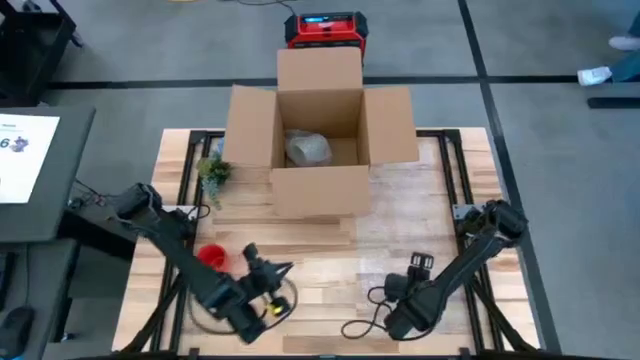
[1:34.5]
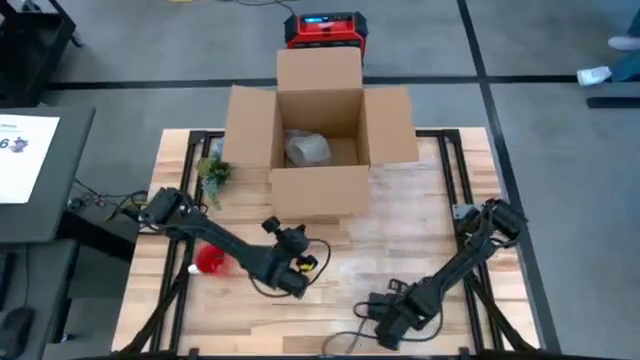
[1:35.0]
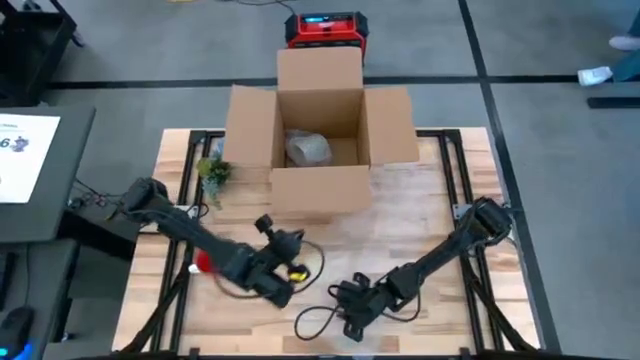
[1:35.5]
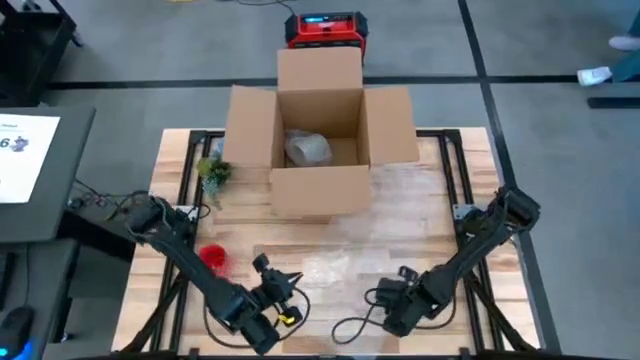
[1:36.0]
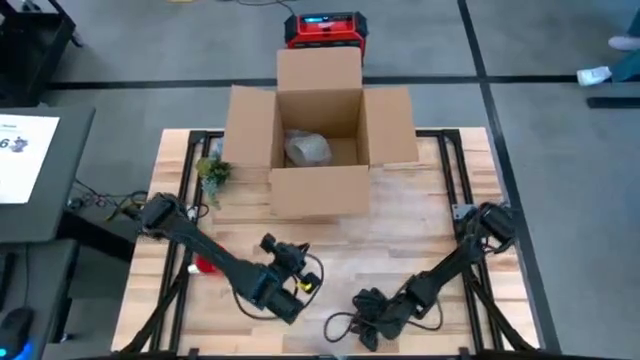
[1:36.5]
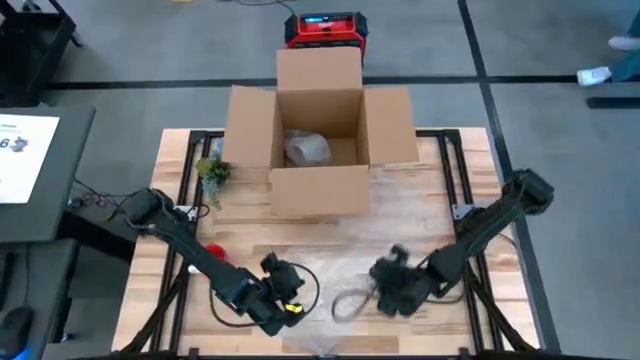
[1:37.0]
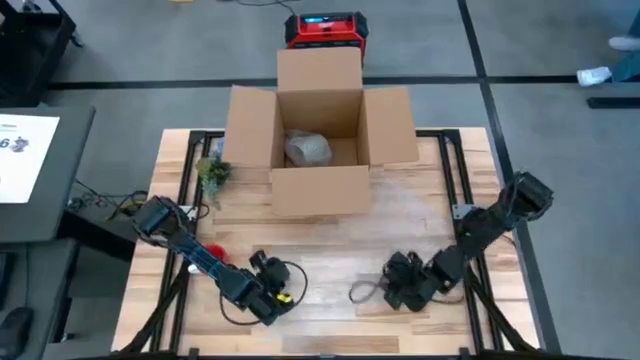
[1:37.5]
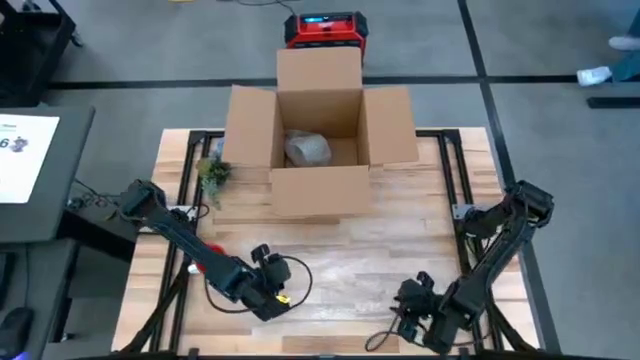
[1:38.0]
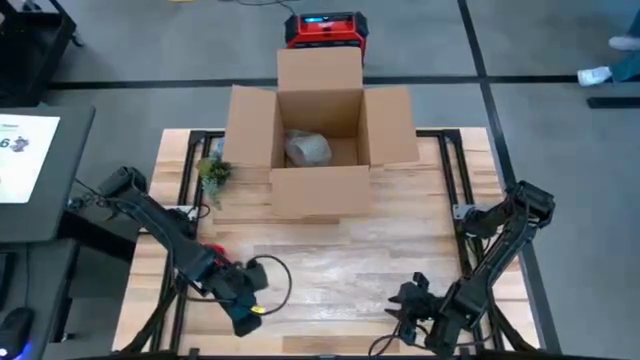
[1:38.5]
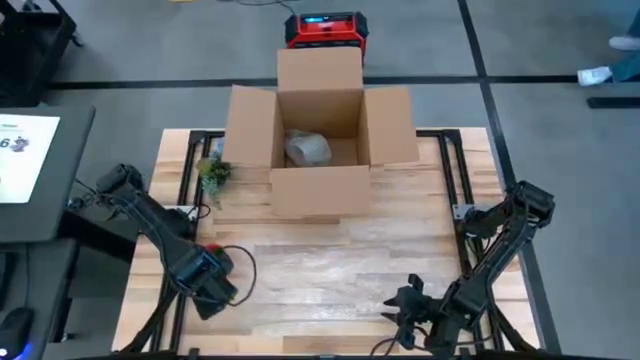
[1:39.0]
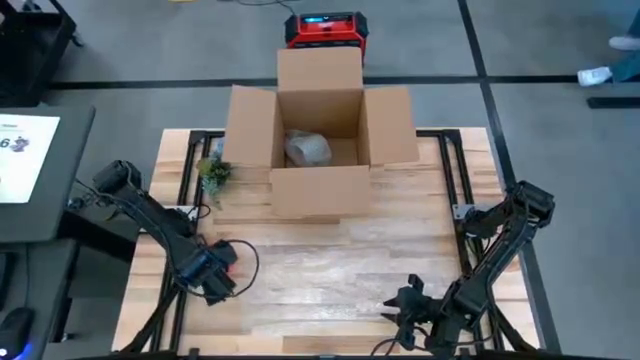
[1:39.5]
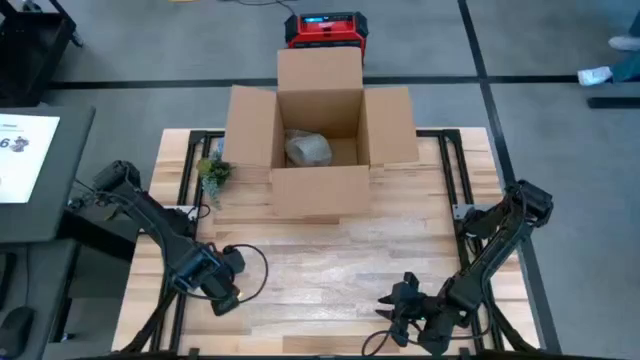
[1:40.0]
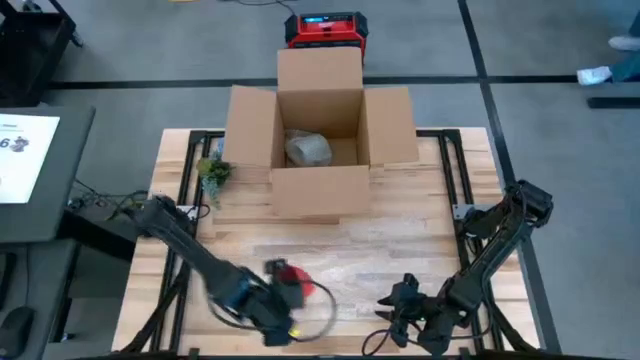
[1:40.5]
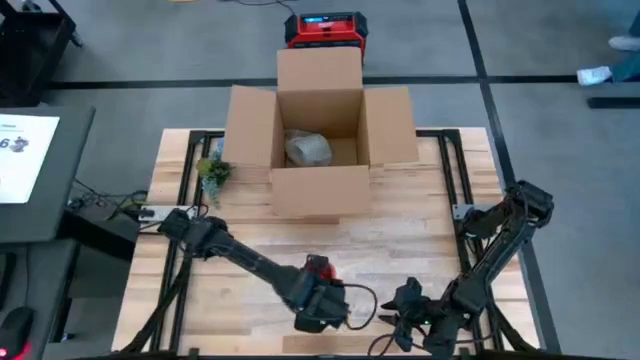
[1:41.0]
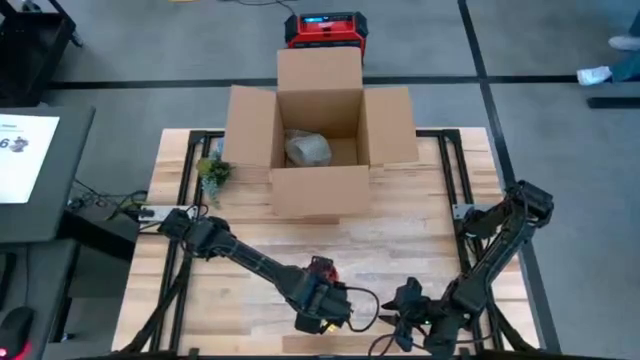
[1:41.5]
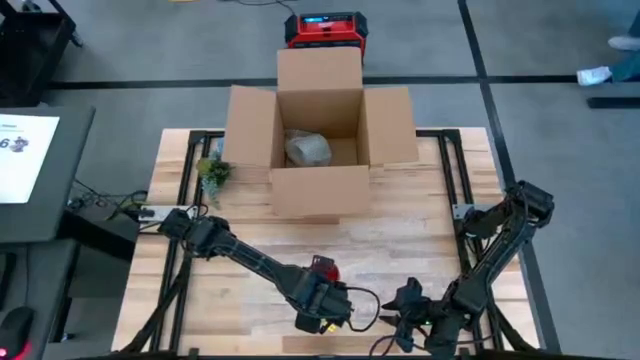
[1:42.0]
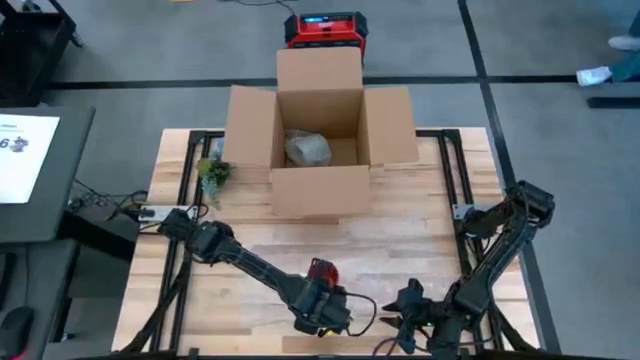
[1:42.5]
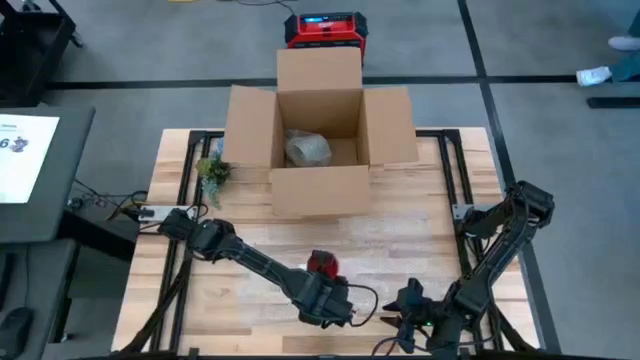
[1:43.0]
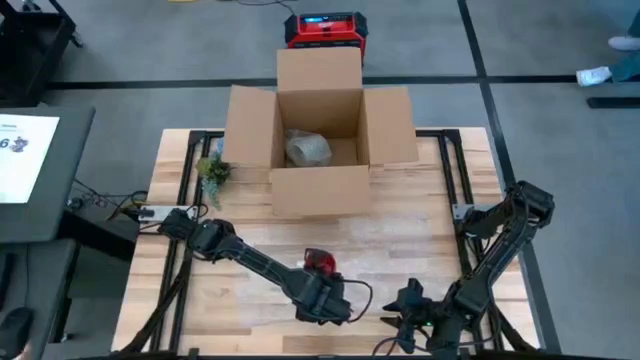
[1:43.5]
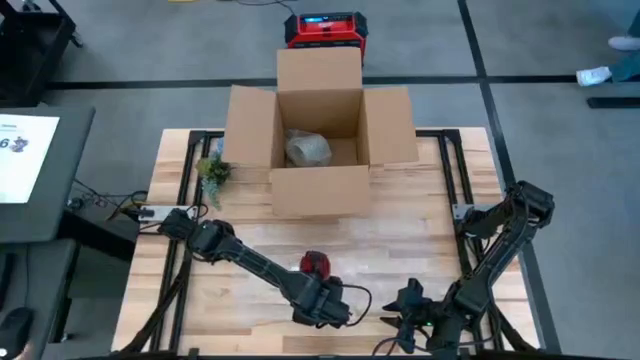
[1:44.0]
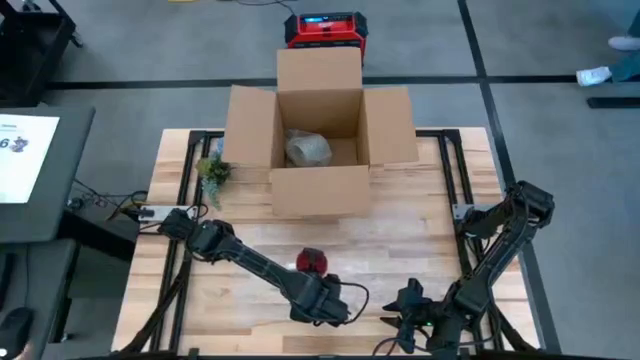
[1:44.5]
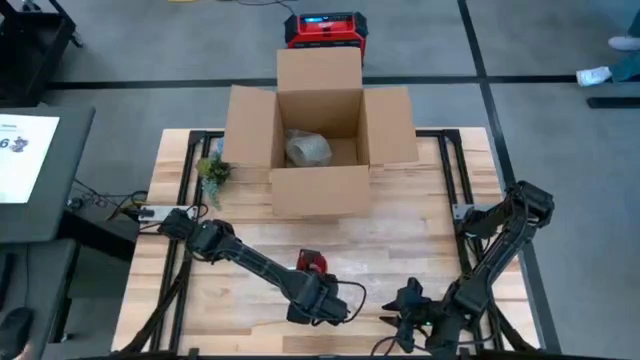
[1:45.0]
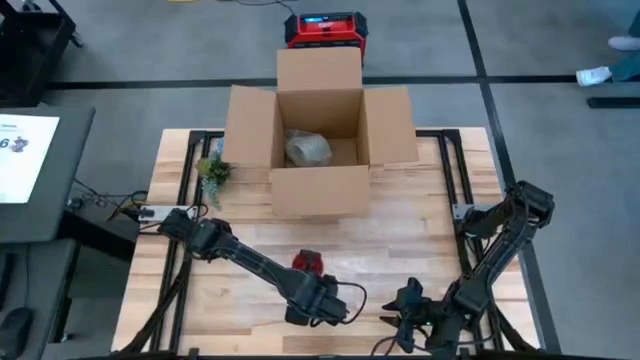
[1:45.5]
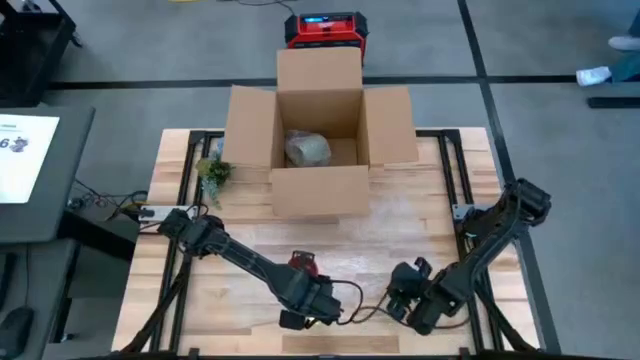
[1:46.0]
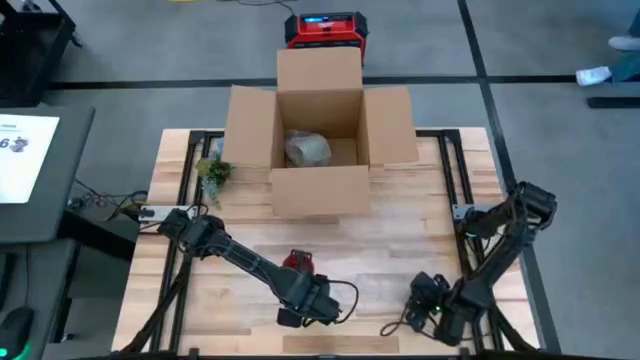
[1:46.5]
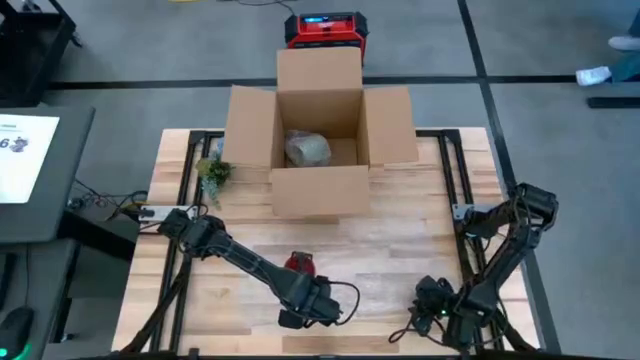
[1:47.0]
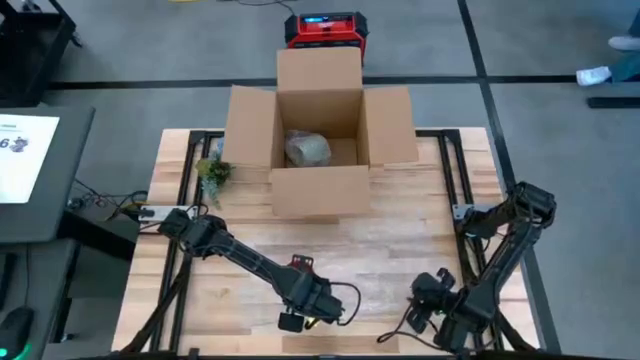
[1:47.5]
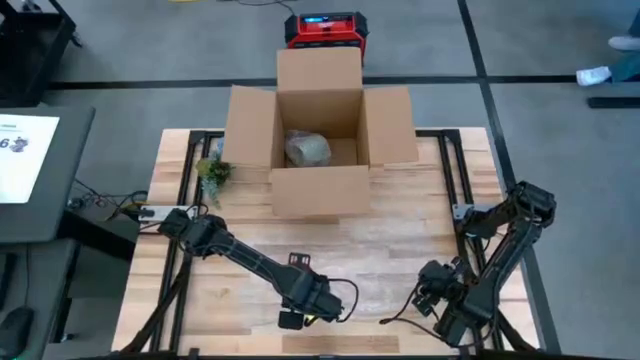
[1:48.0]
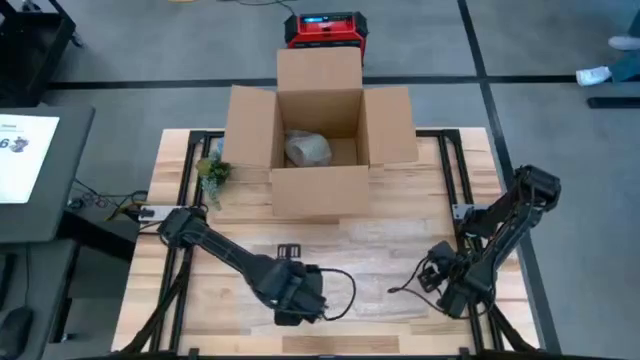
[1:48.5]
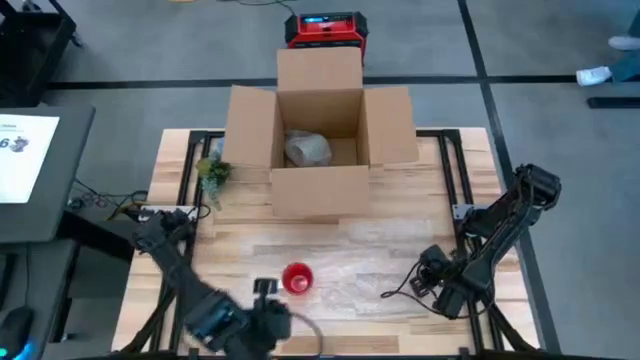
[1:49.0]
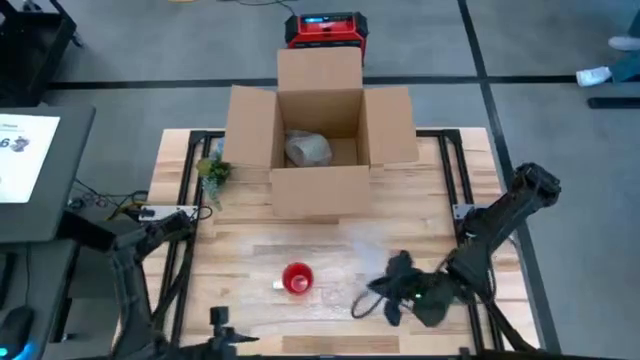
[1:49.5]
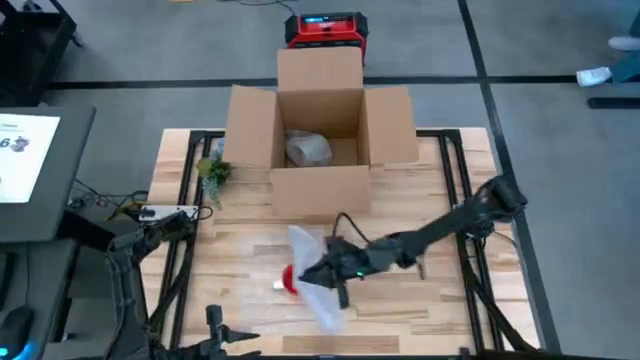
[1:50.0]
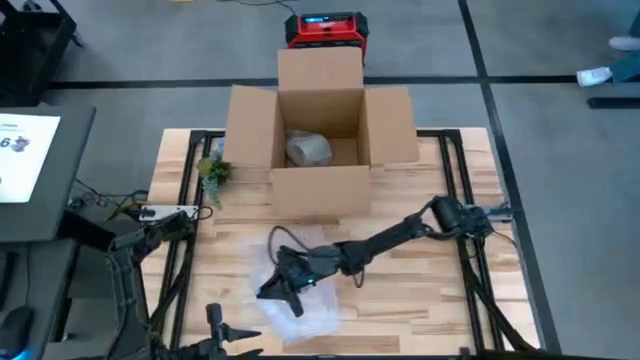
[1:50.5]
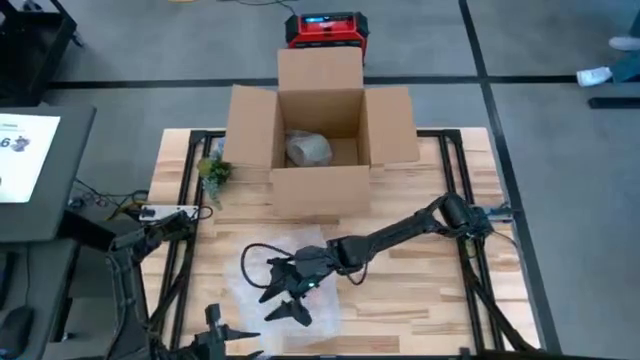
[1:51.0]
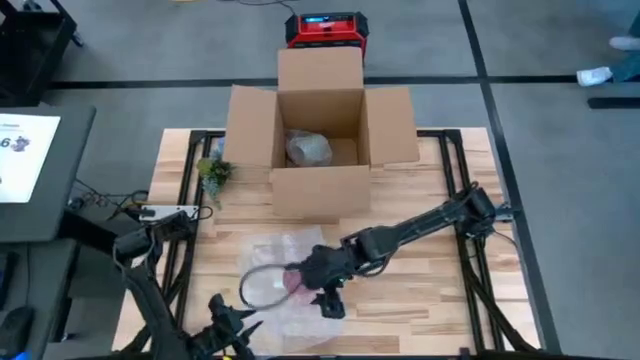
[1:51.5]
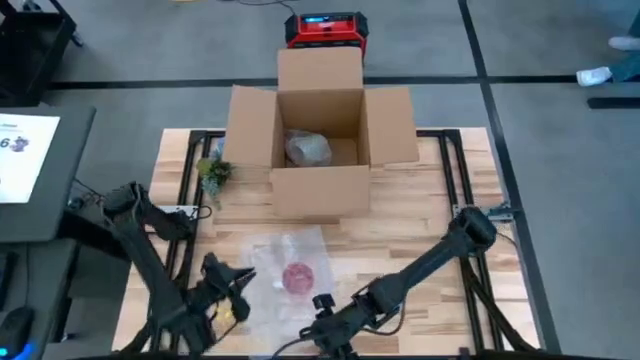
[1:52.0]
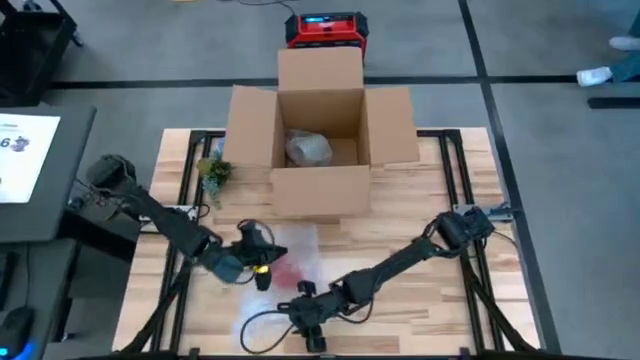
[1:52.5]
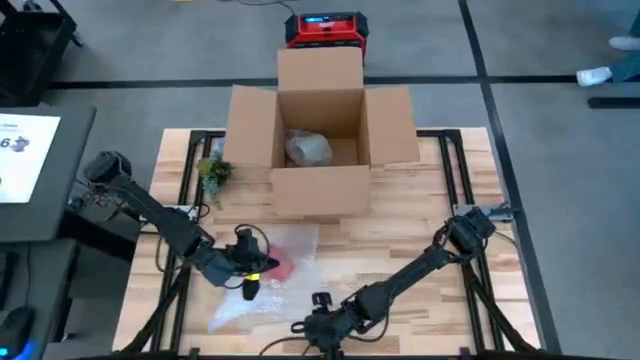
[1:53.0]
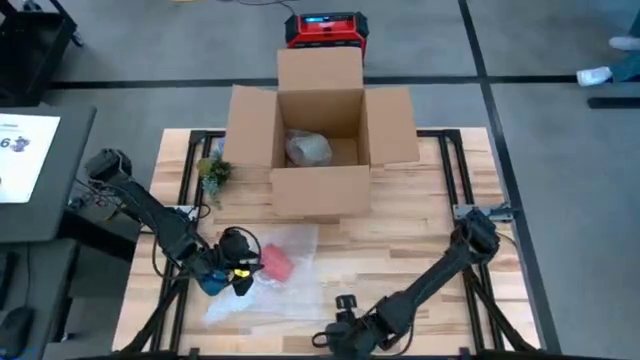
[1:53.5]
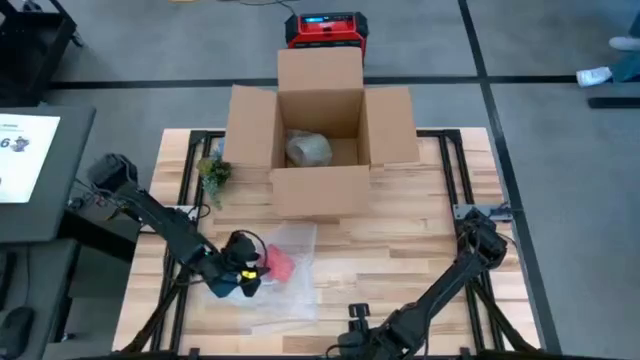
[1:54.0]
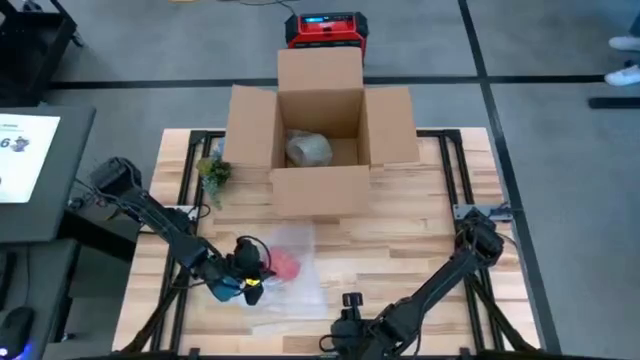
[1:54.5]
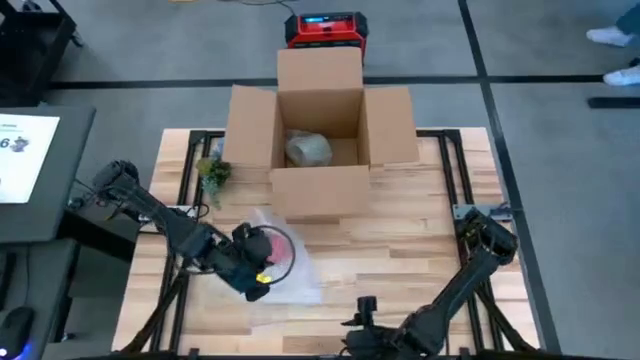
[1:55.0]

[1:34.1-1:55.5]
Task: wrap mug
Pack the red mug with the bubble wrap
